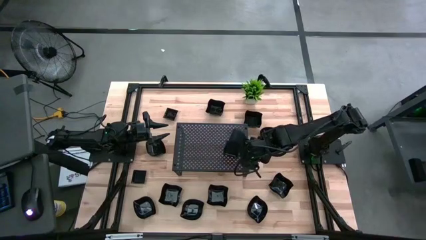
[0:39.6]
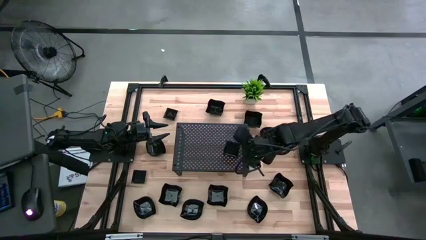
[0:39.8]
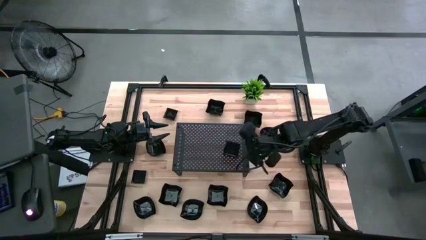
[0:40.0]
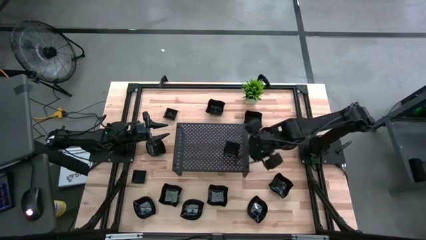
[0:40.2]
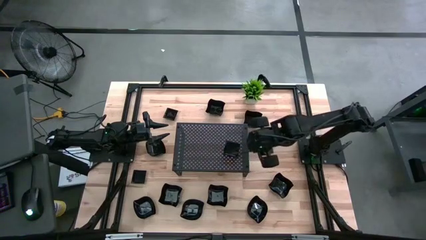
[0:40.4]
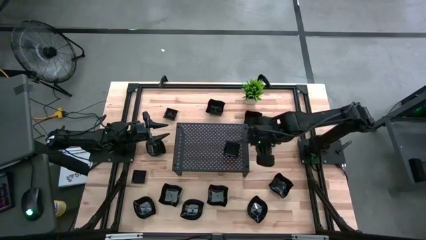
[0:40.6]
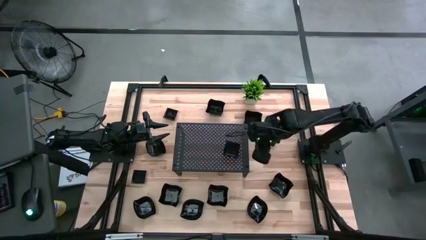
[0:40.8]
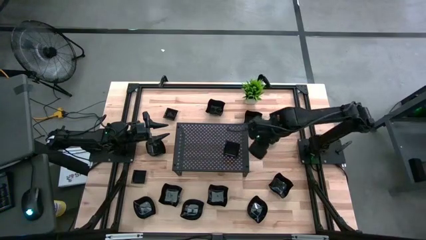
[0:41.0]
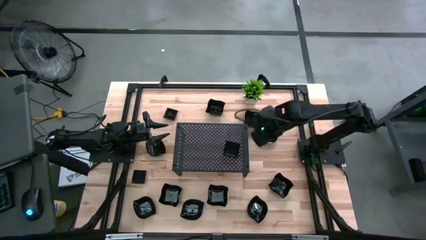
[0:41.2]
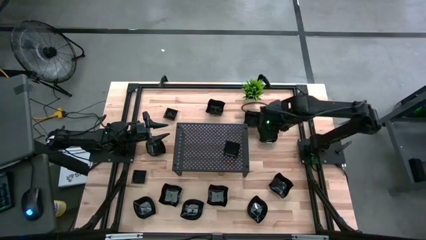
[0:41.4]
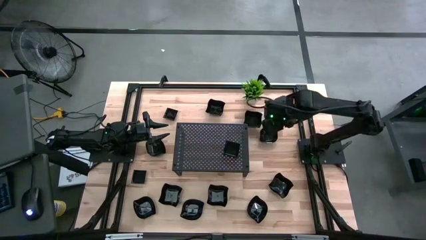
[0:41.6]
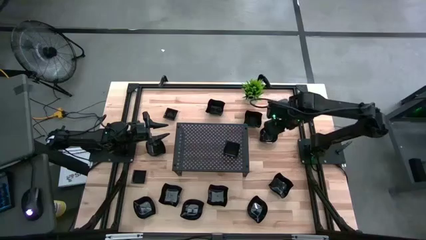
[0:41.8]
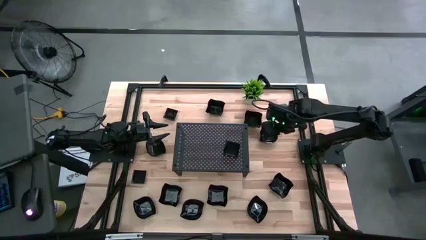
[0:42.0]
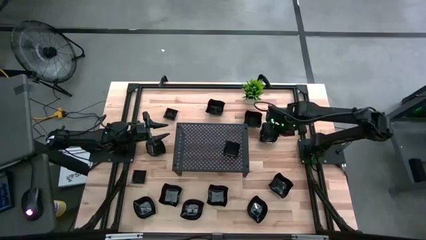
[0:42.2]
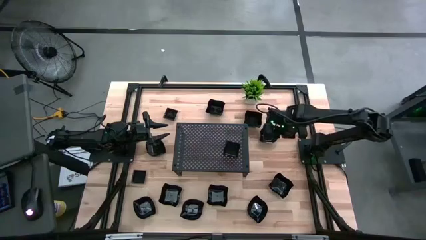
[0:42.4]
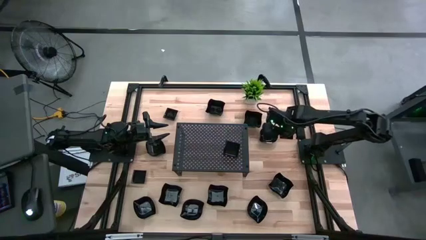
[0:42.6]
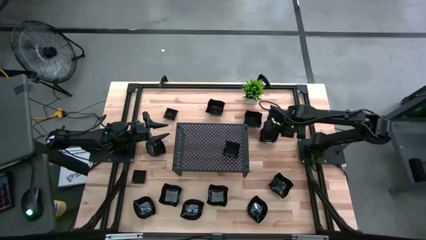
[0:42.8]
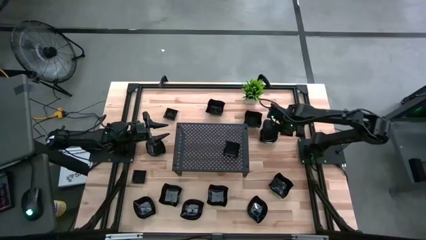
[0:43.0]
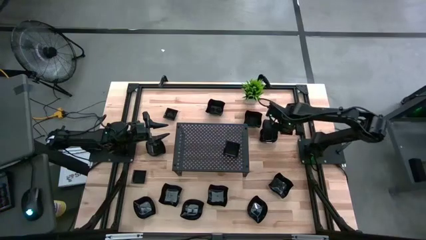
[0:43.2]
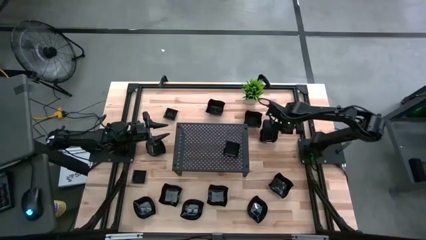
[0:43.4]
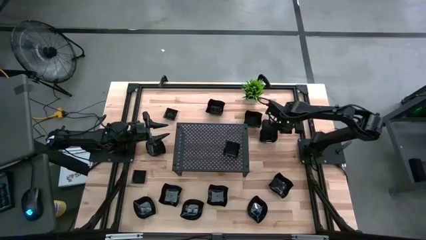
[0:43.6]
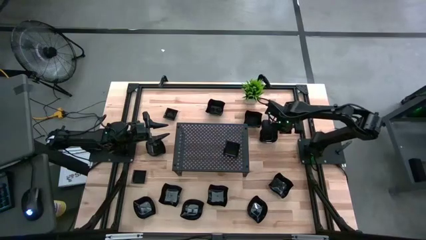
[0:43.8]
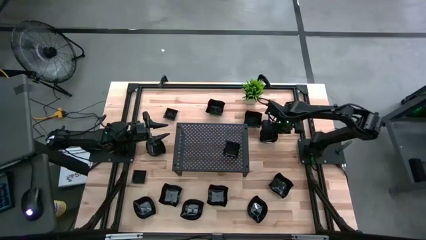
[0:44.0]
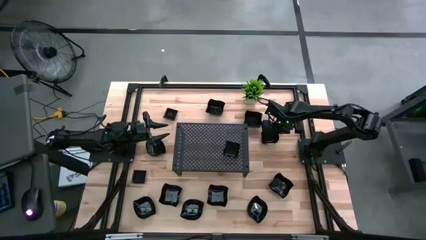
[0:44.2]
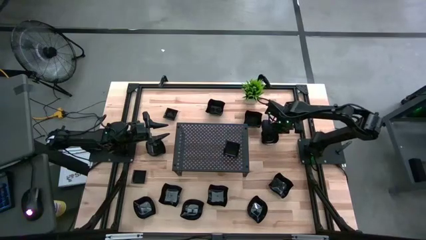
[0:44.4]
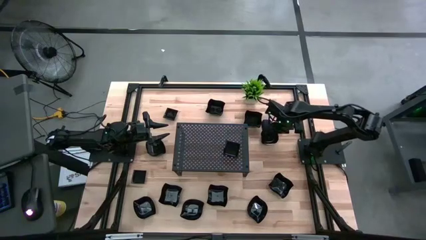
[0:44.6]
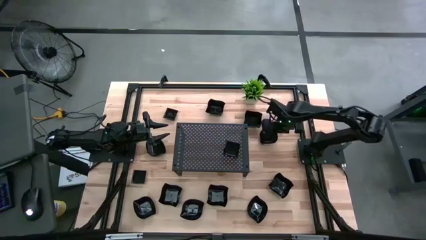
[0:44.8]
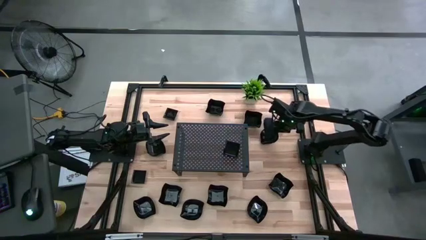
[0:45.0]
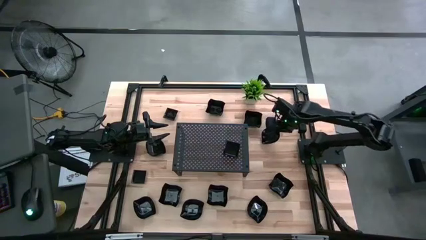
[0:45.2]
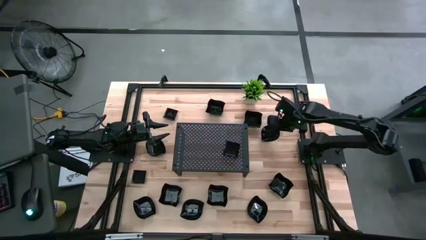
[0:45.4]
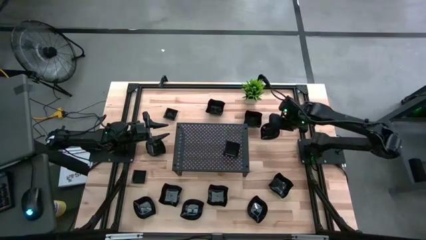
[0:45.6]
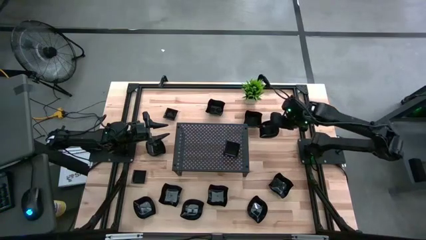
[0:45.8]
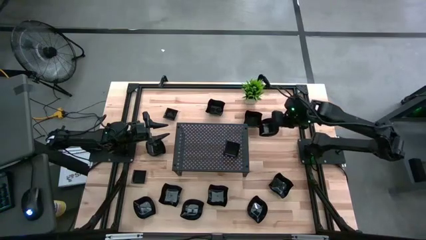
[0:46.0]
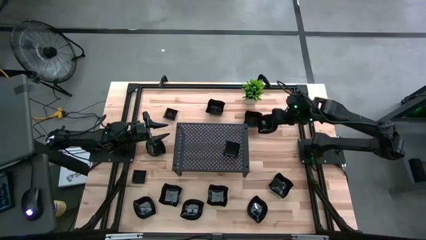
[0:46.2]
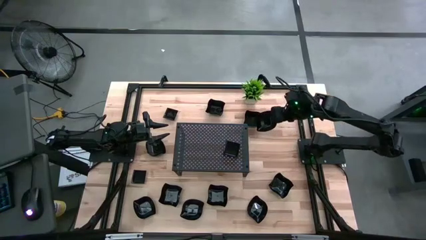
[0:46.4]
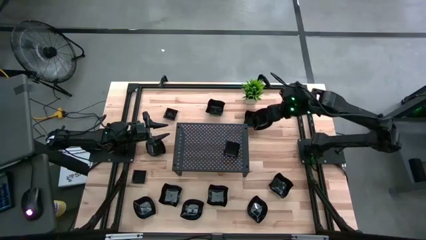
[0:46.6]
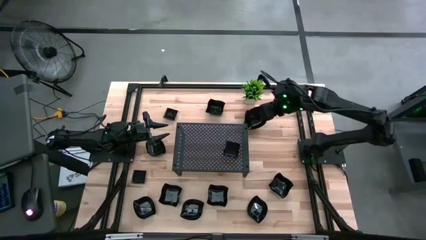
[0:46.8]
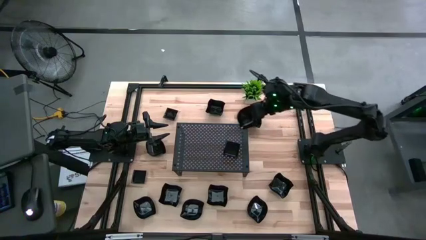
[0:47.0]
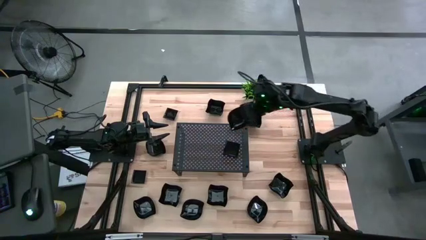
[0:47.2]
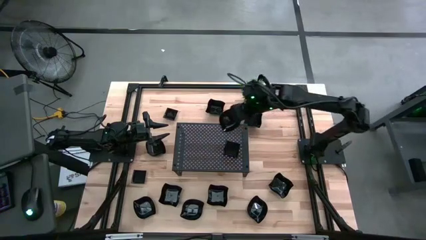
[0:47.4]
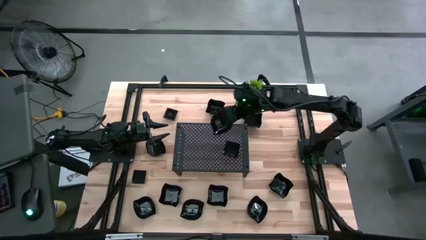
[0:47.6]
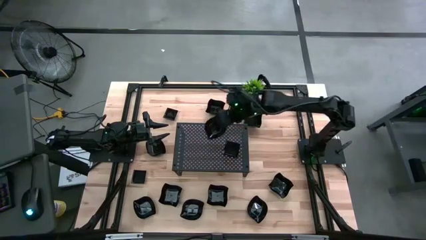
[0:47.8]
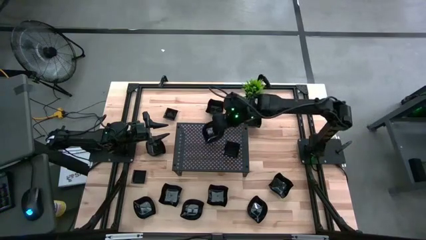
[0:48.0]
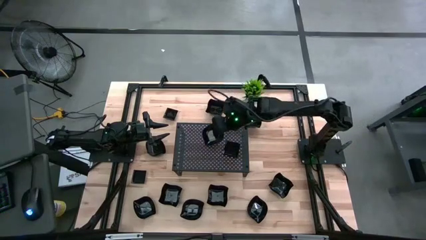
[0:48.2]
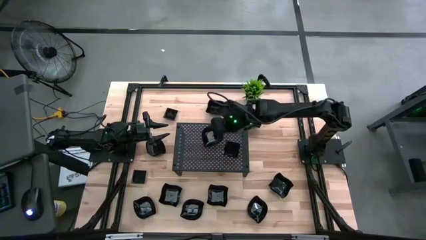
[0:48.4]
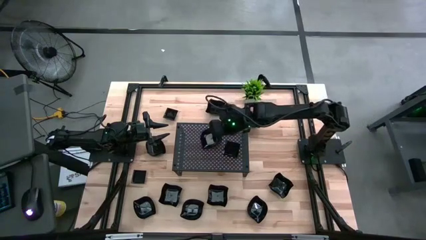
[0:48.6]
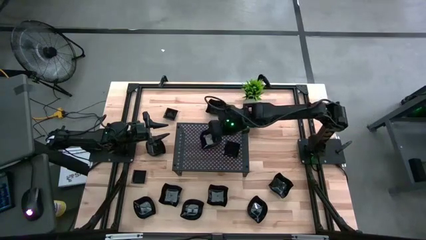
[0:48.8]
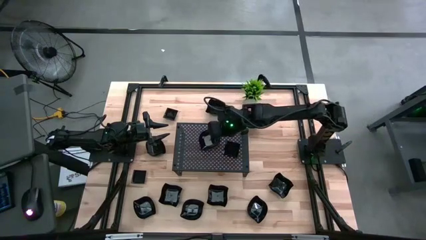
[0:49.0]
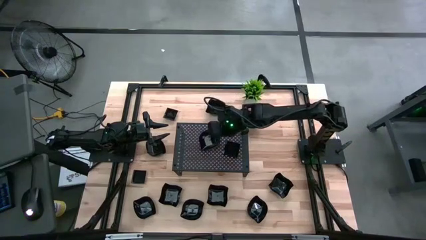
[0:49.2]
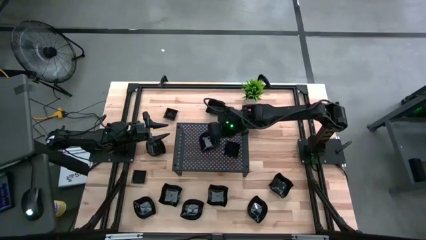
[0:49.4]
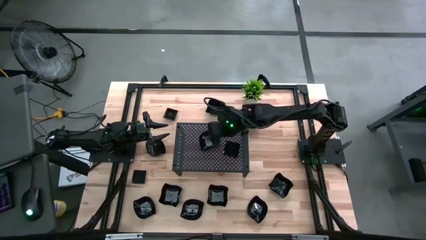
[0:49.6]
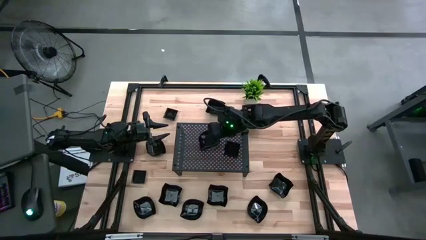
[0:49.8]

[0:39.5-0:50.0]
Task: Pick & Place Mini shaped plates
Put the leaf shaped plate on the shelf
